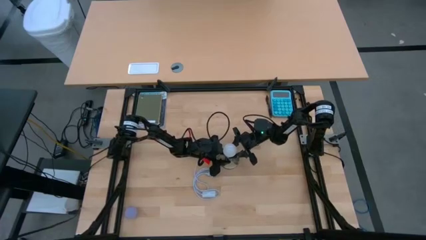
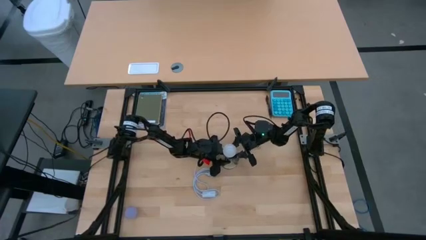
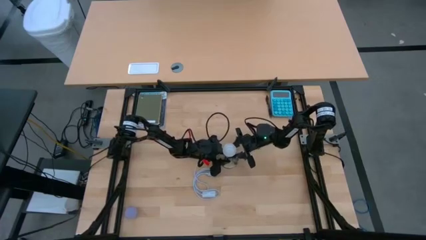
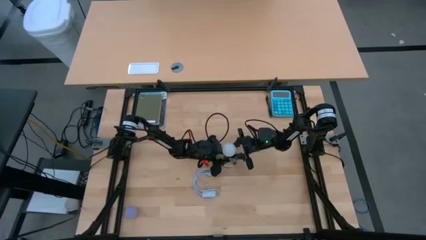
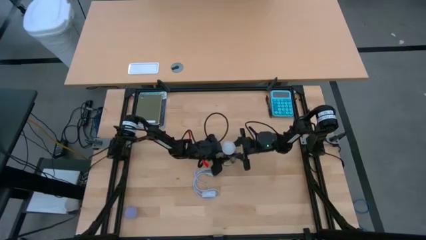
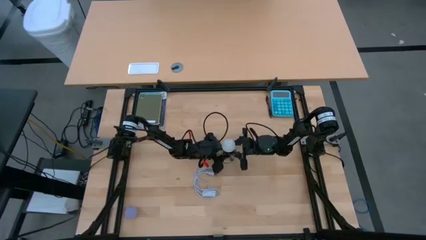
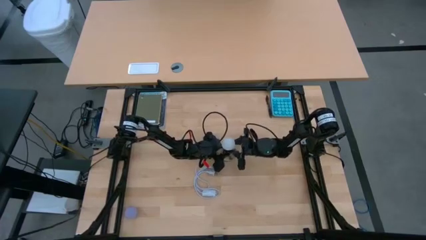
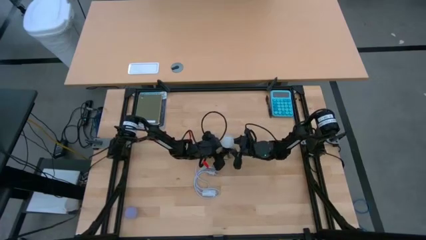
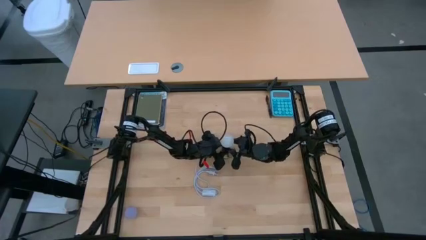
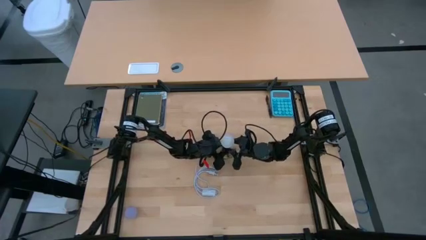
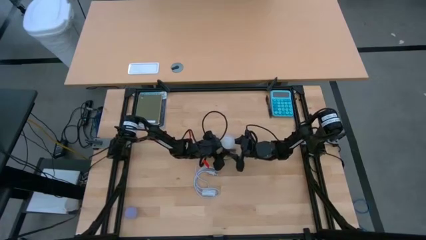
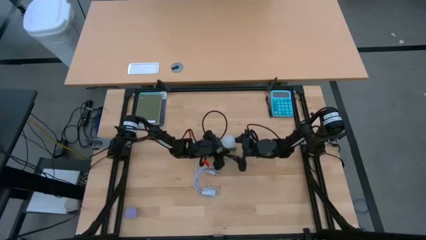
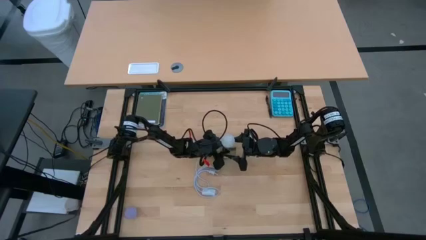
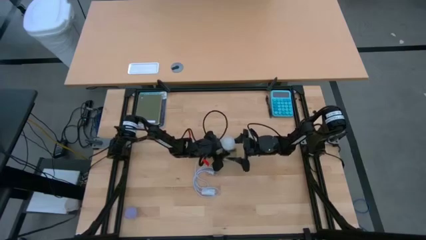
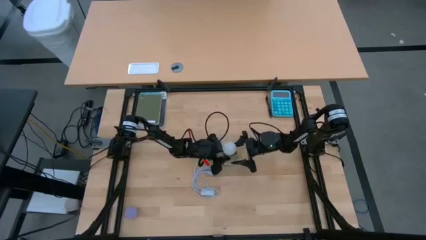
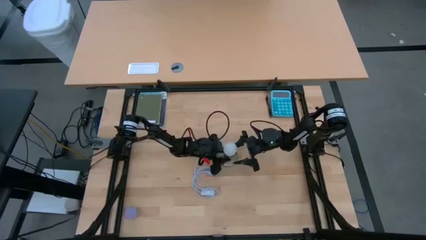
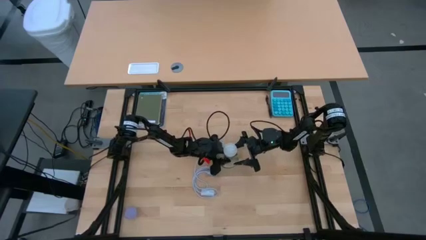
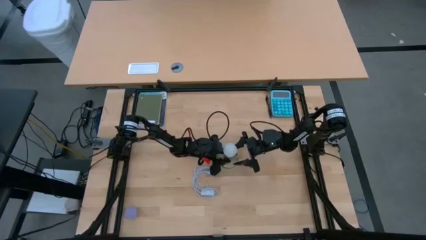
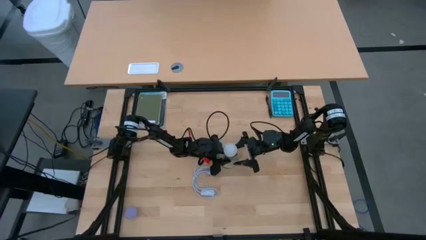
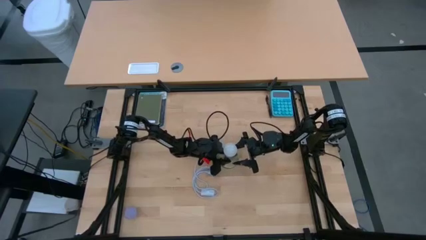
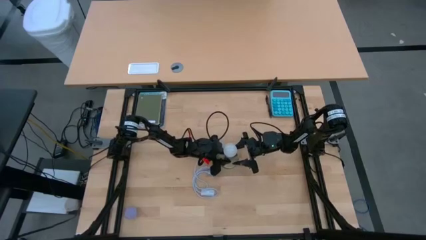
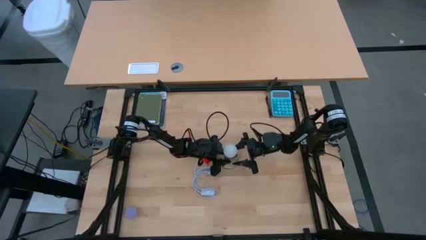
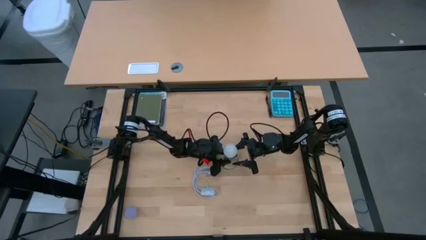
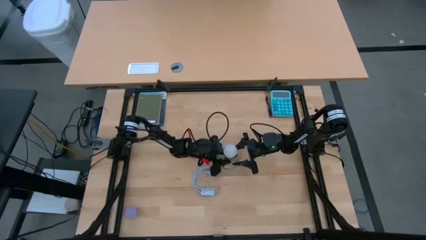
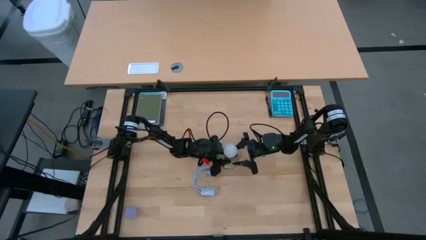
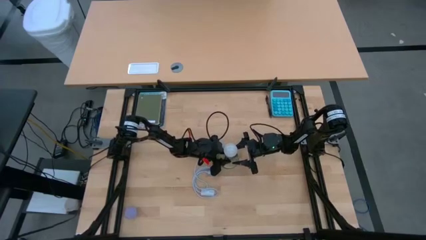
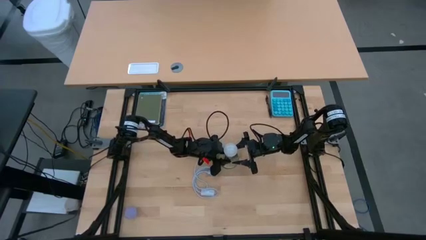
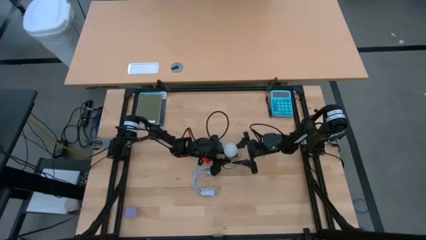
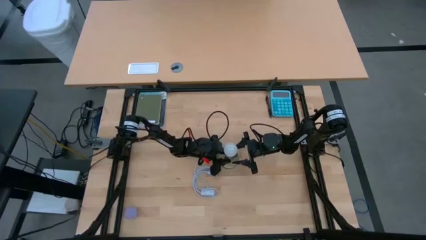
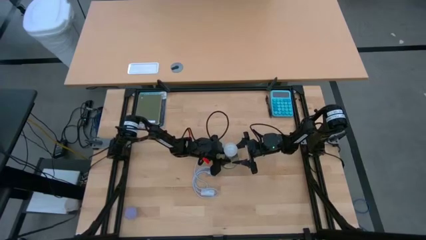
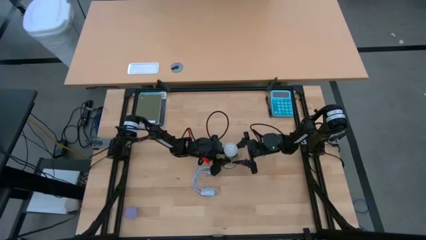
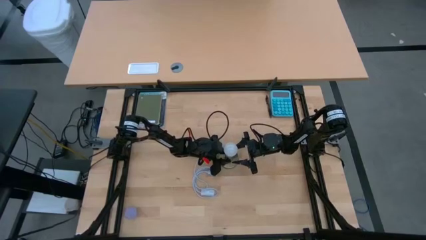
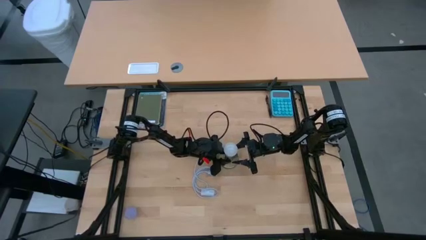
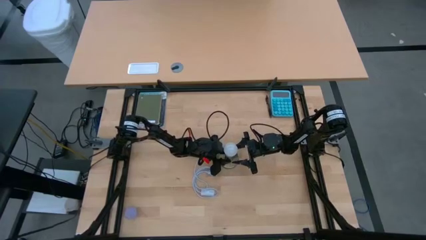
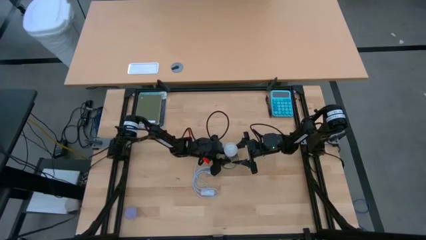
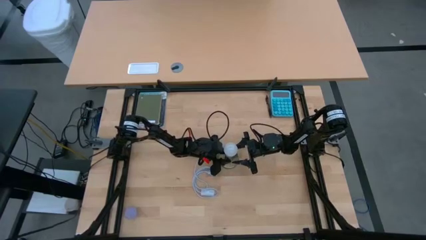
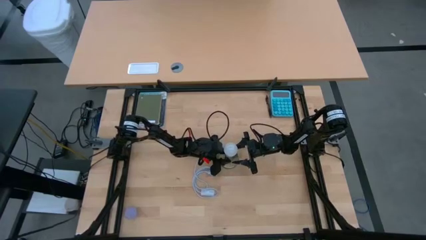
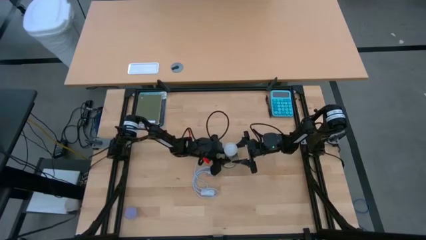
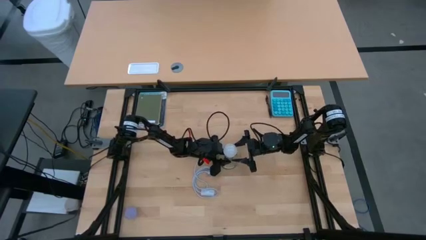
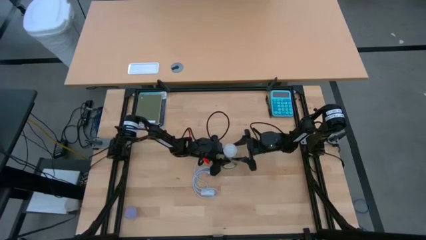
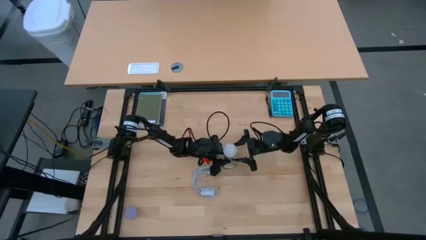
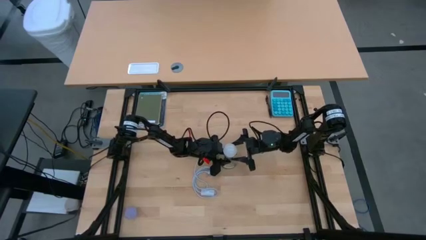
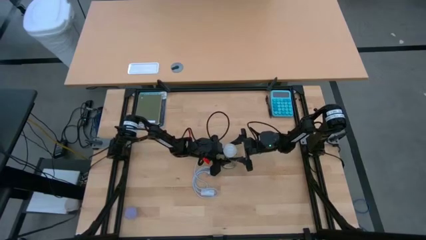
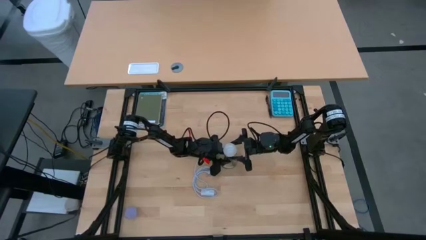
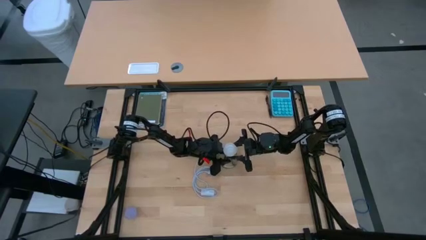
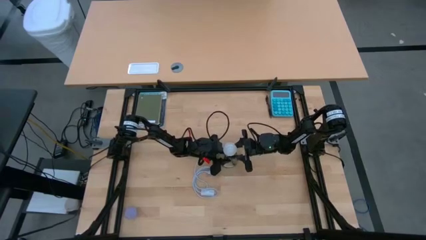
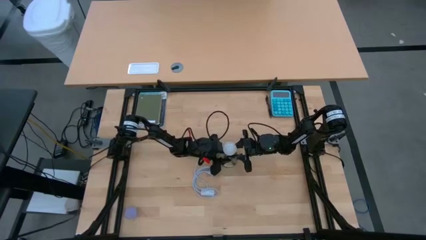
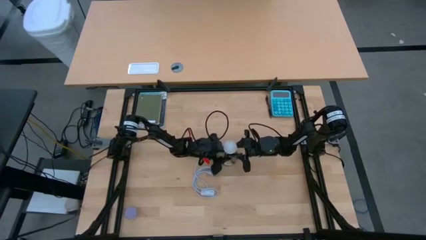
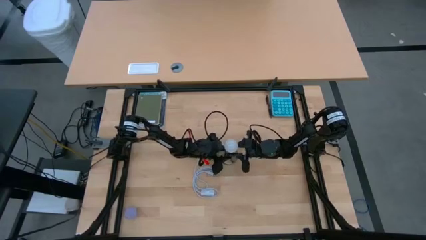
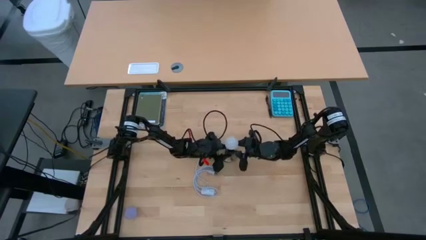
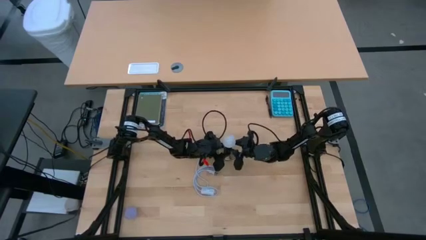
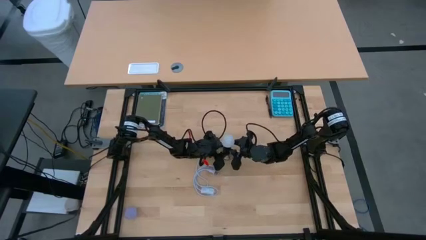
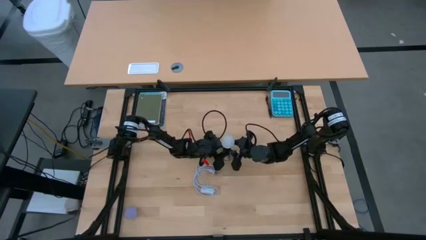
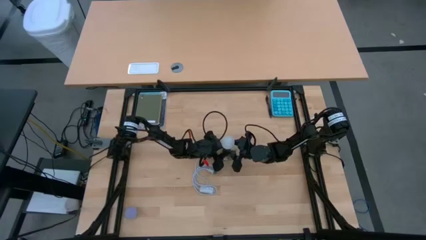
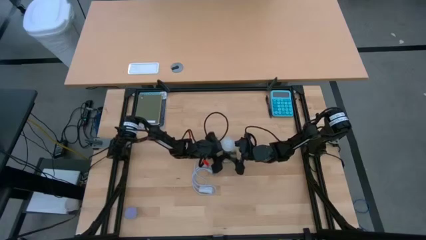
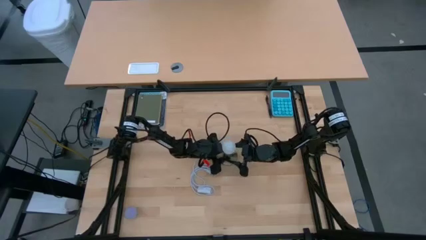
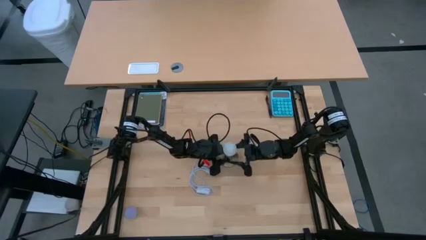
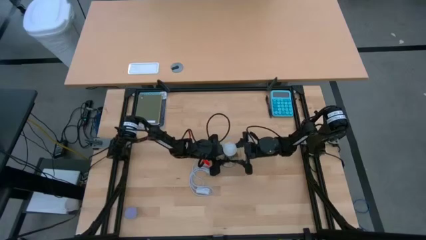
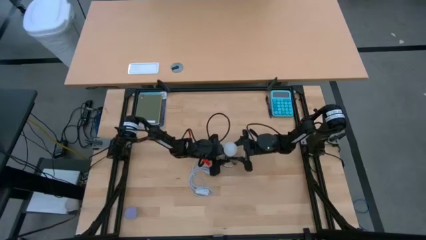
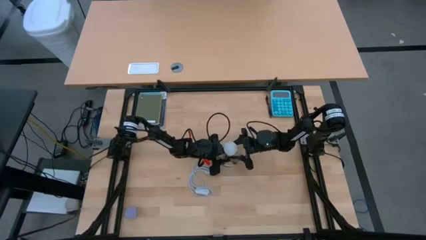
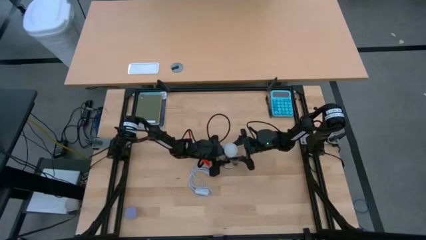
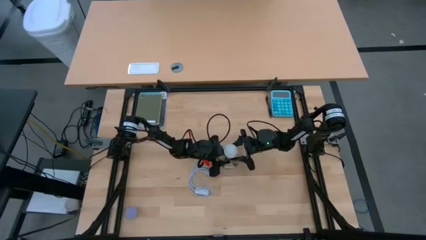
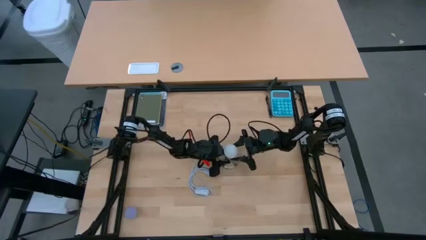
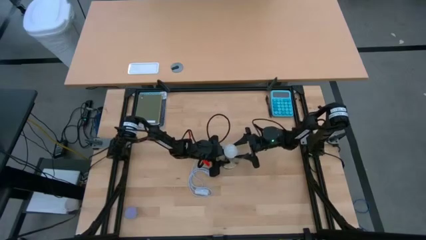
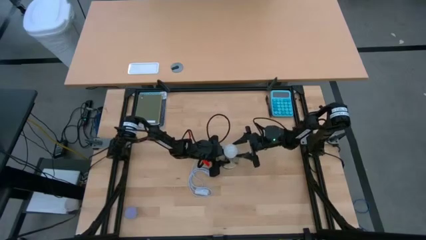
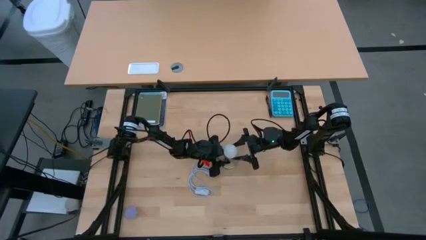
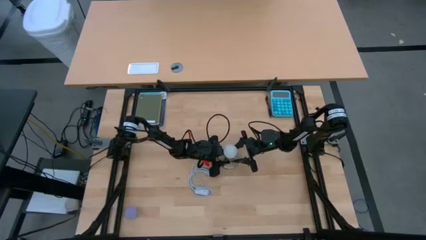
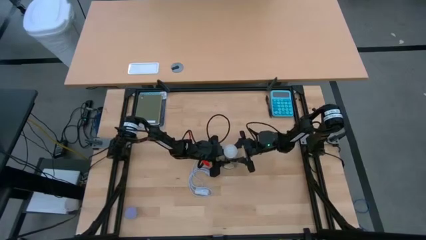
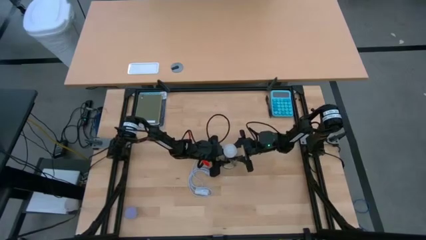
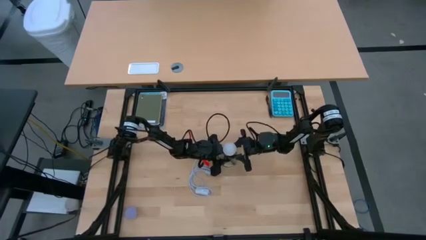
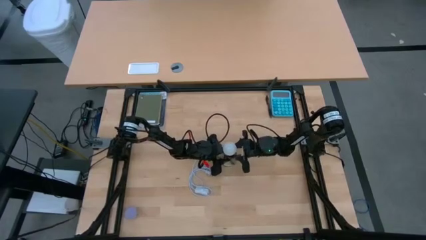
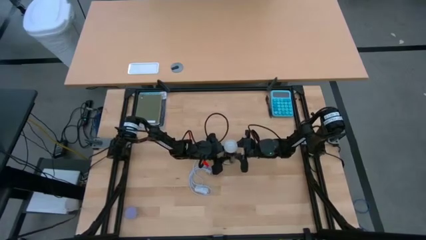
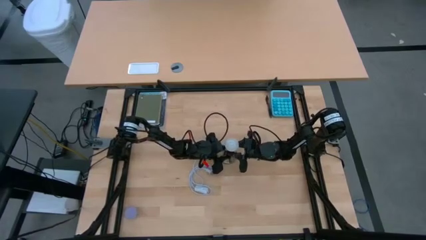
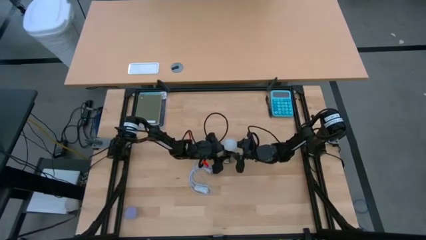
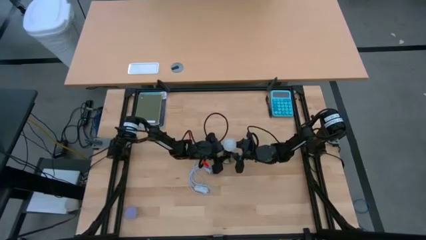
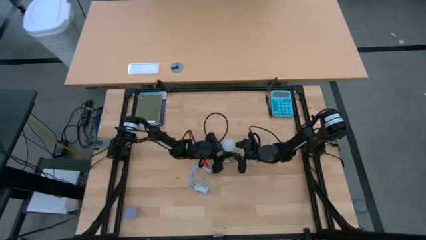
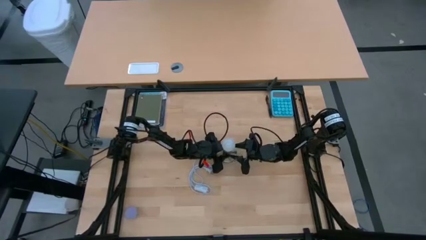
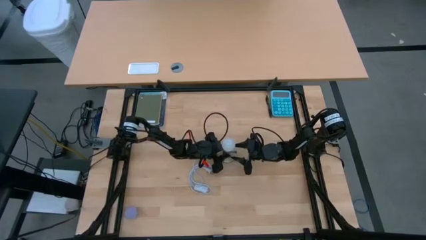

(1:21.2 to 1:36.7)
Task: Screw lightbulb
Insert the white lightbulb into the silver lamp

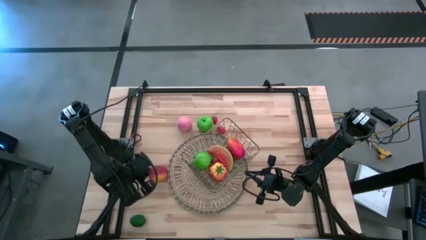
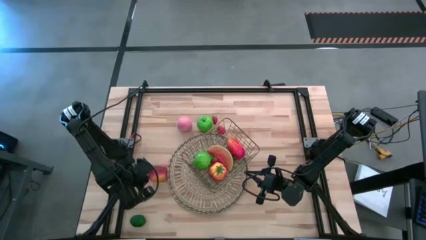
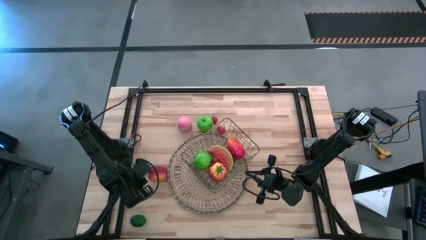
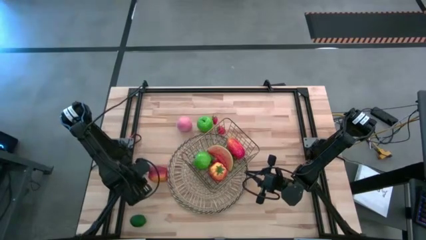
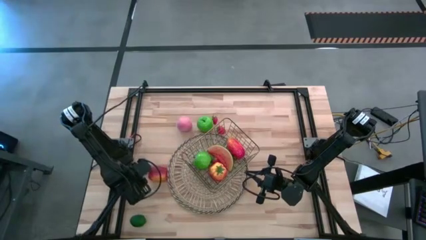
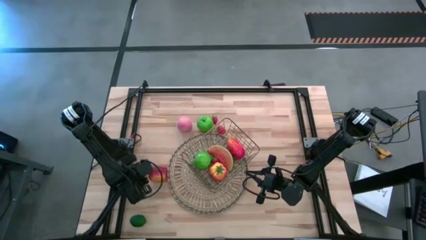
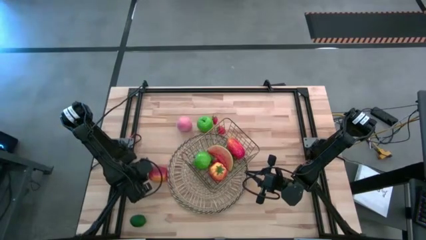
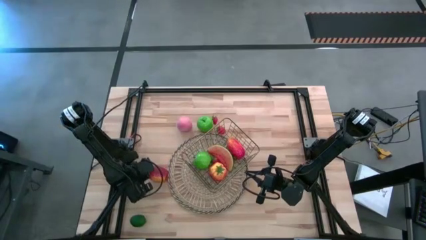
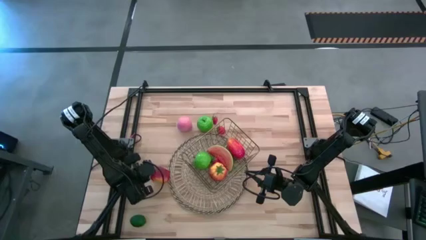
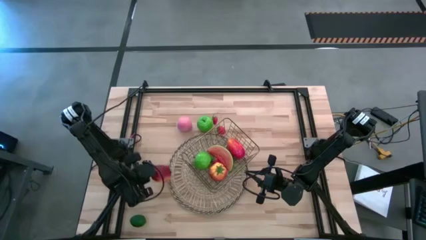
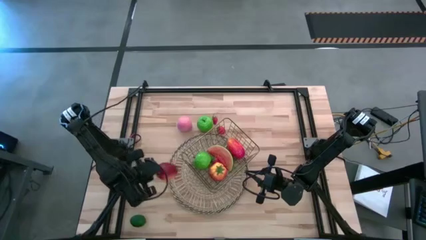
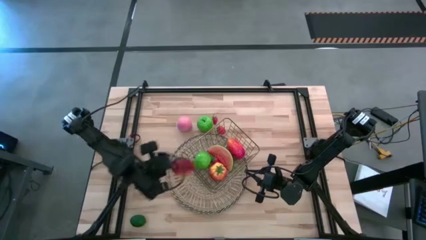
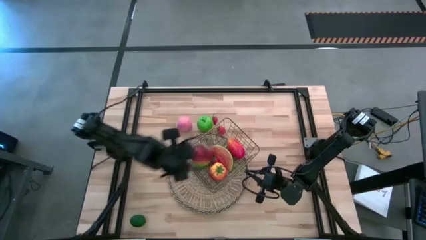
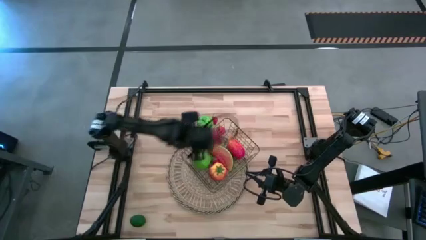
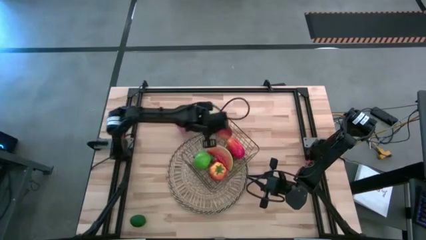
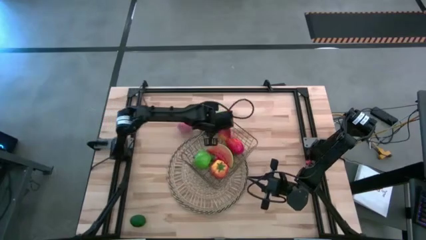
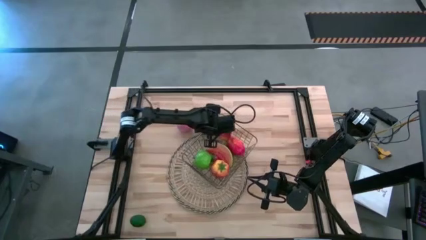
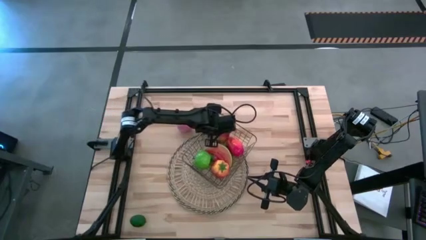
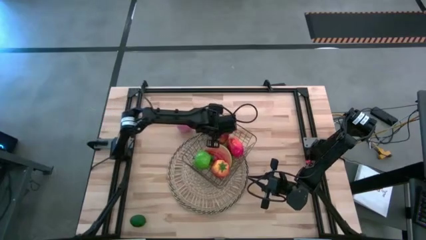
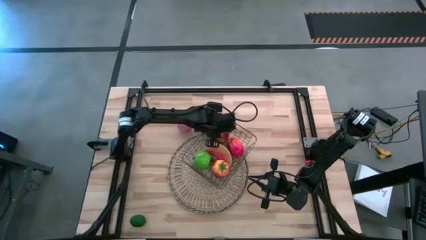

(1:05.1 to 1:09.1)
Task: Build produce basket
Put the red apple into the gold wire basket
